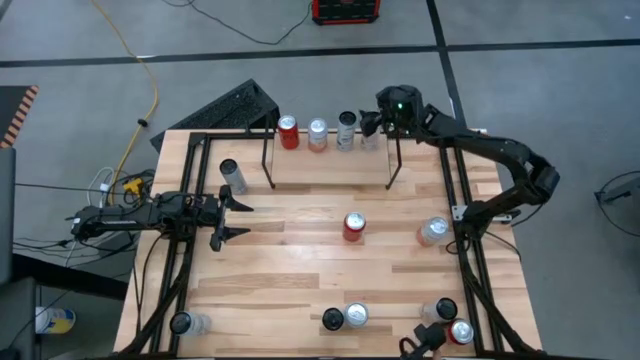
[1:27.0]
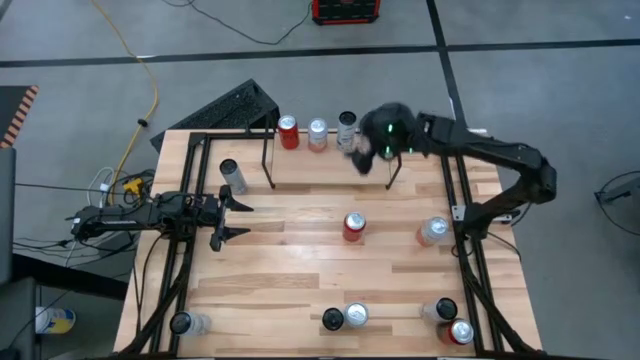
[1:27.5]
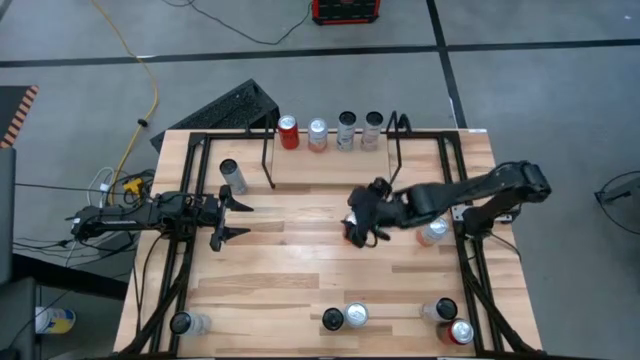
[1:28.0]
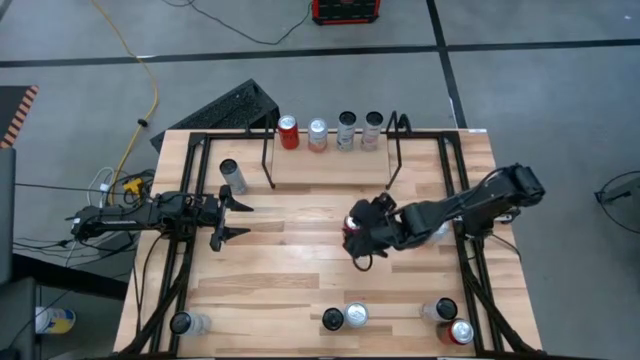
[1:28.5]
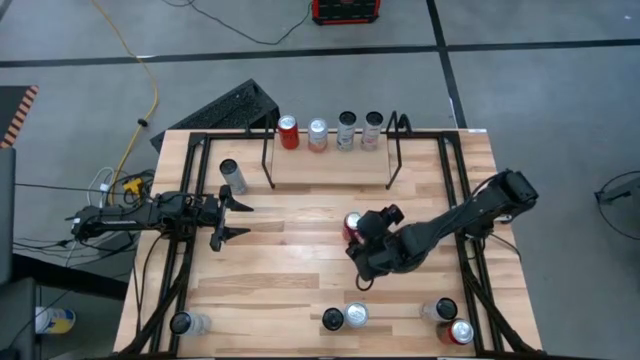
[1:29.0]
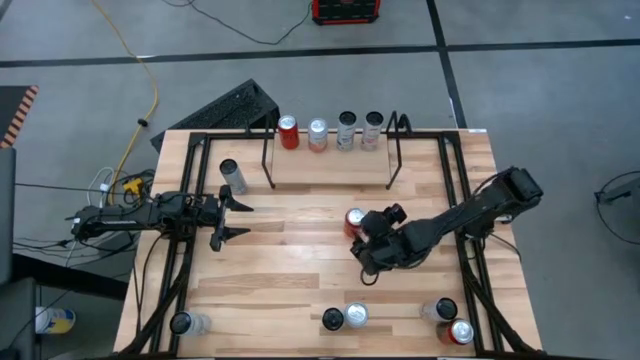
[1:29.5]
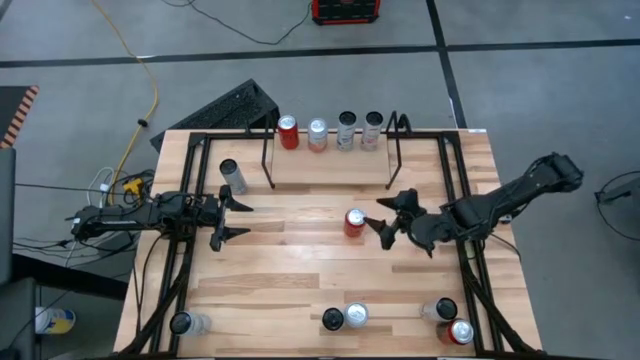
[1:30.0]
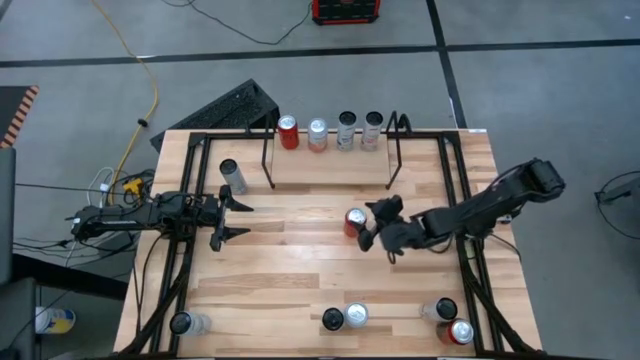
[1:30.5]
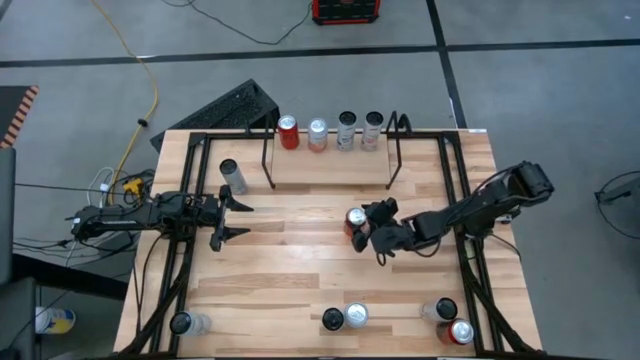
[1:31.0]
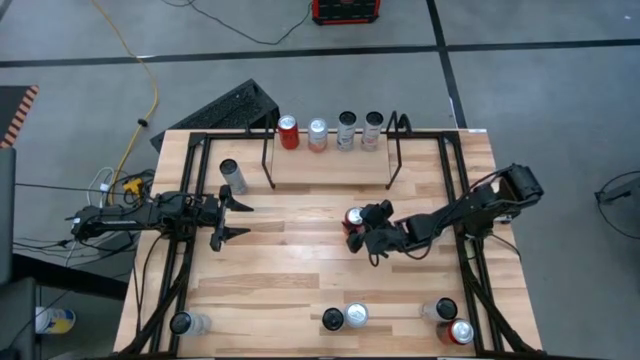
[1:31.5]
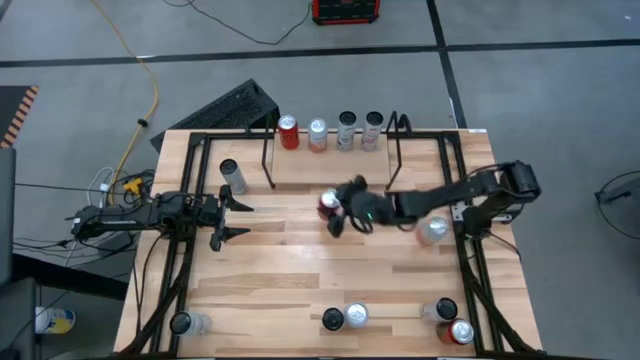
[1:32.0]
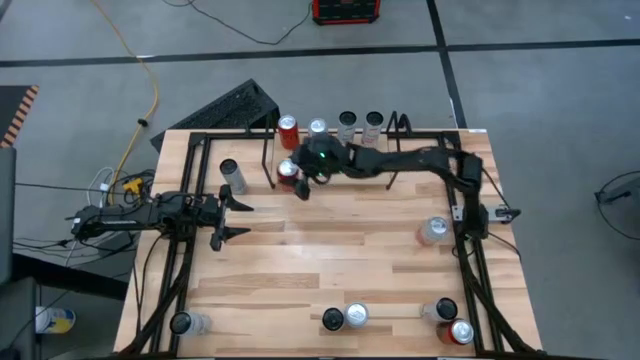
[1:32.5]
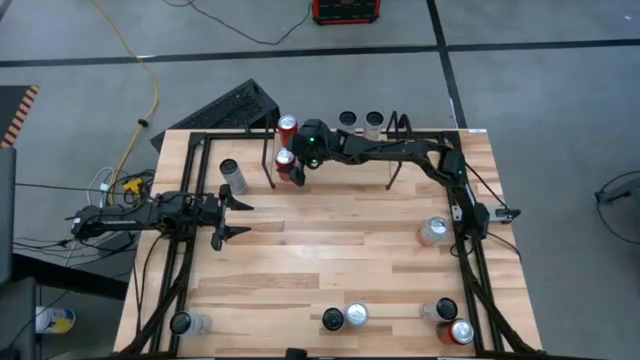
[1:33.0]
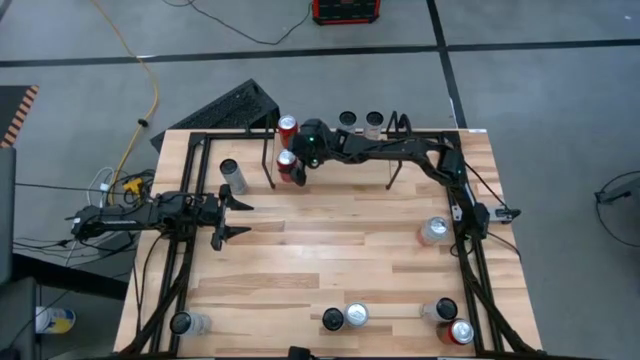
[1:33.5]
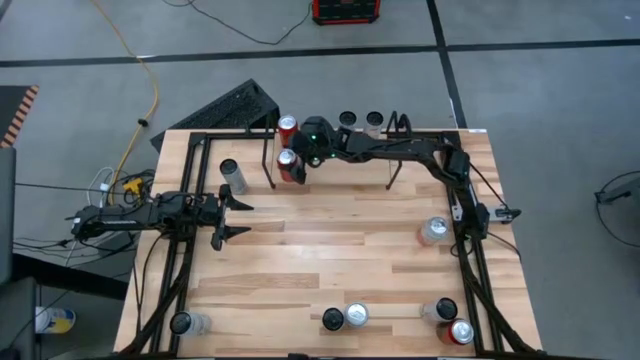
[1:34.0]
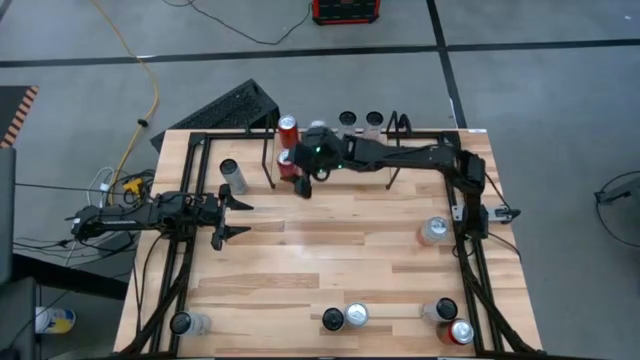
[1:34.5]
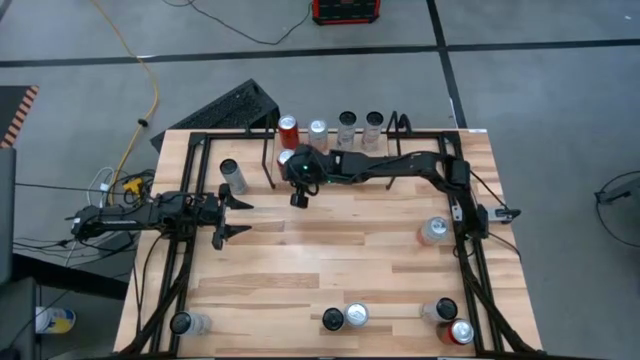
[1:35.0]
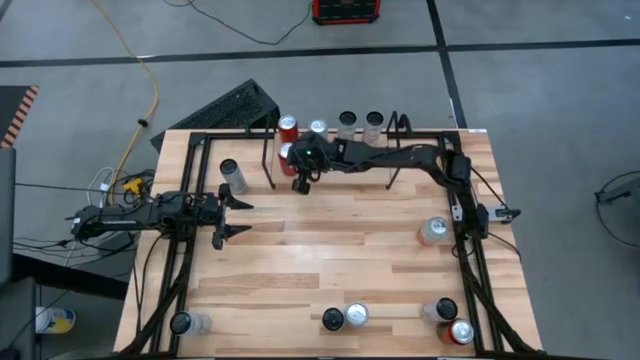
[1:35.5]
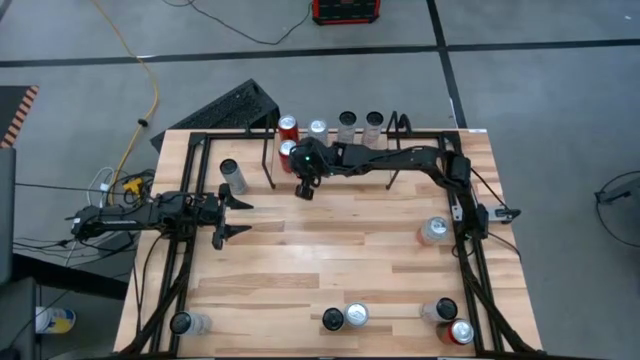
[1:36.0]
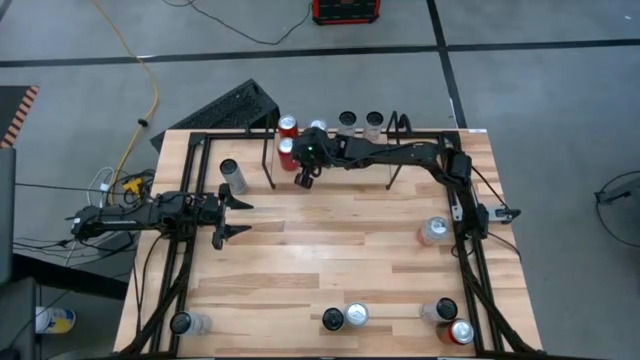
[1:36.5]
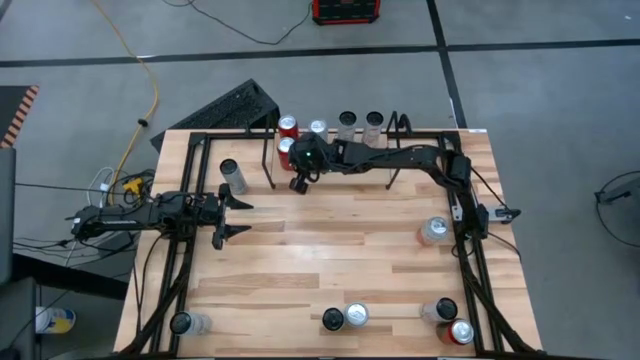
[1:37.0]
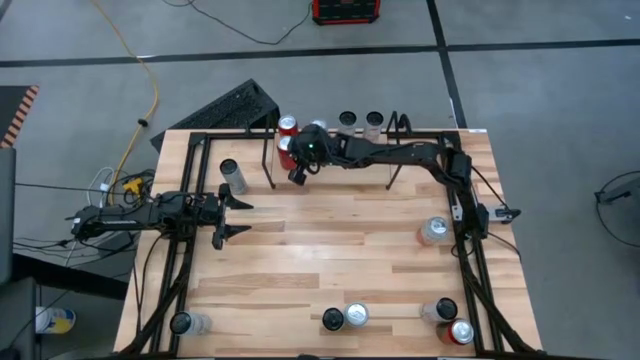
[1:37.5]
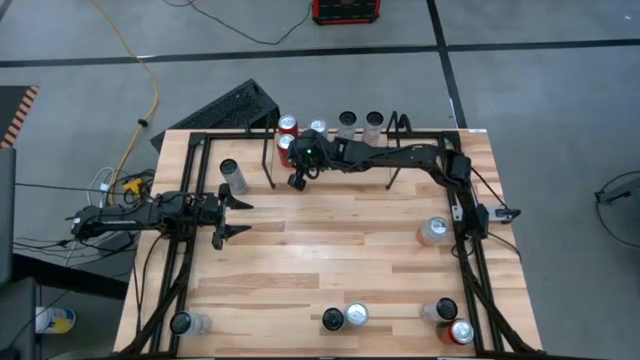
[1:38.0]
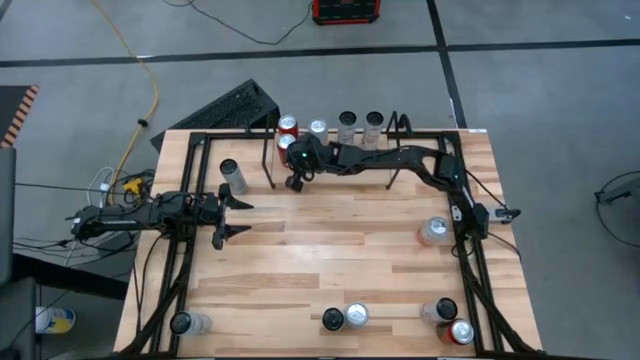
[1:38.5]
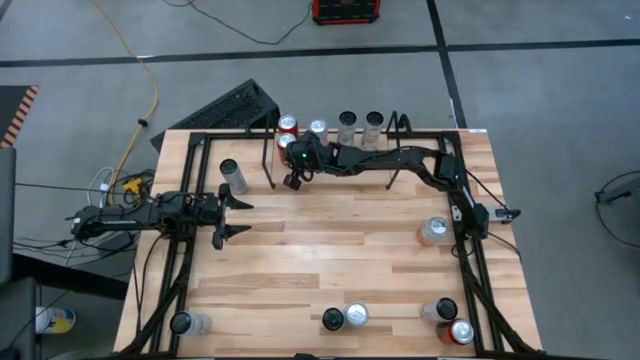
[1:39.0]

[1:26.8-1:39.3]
Task: Place canned beverage on shelf
Put the top red black soda can on the shelf and align with other red black soda can

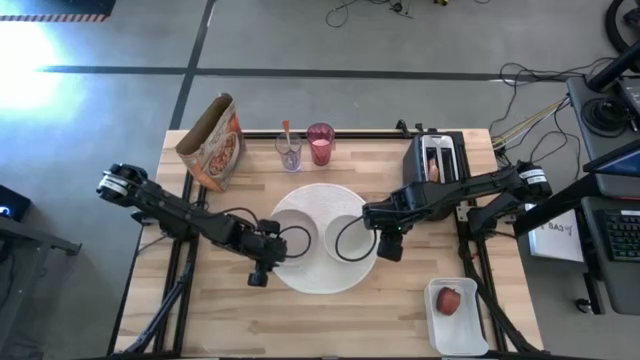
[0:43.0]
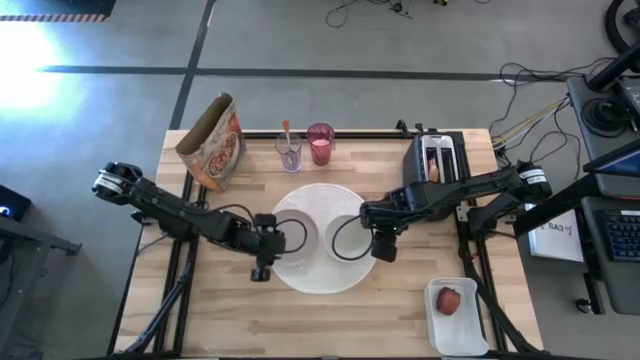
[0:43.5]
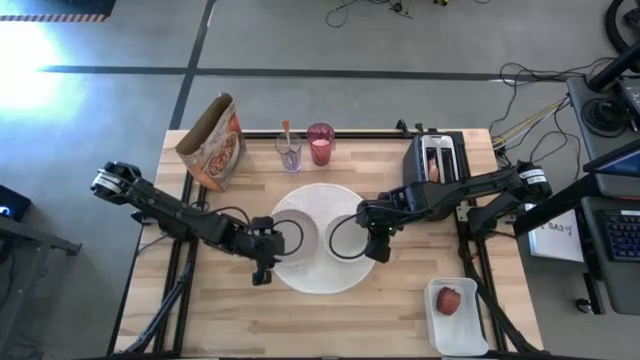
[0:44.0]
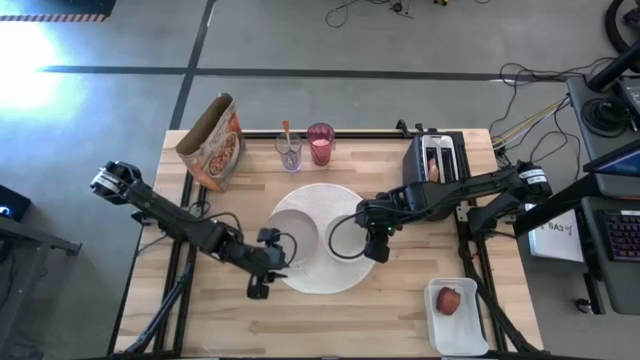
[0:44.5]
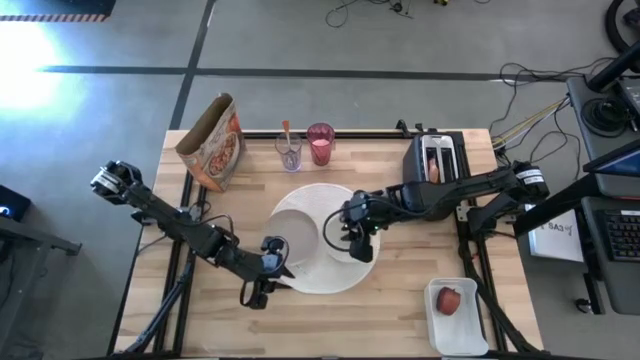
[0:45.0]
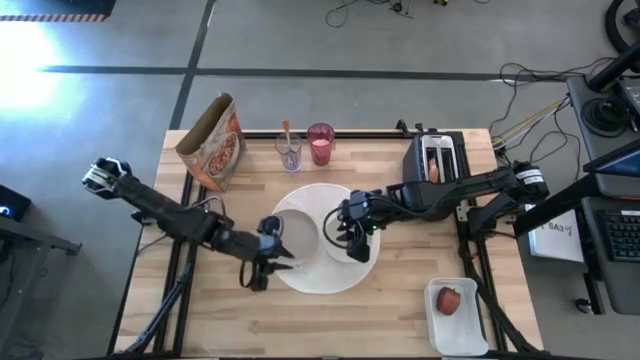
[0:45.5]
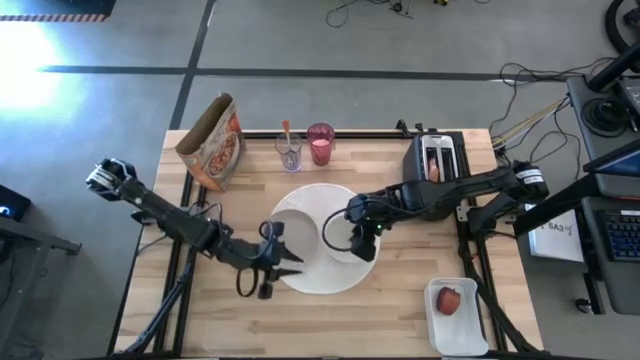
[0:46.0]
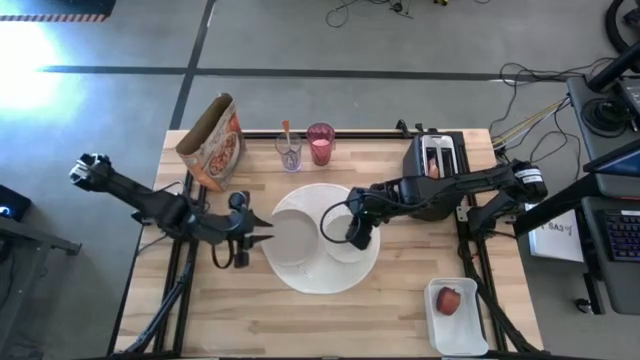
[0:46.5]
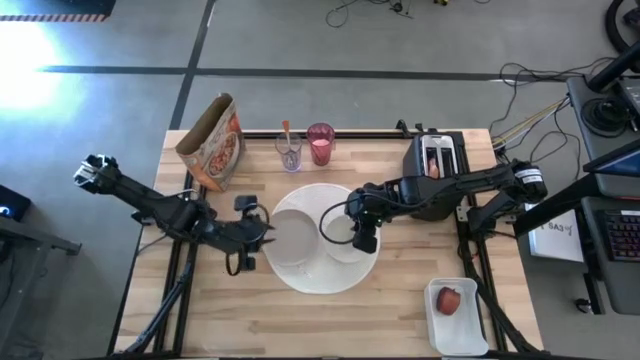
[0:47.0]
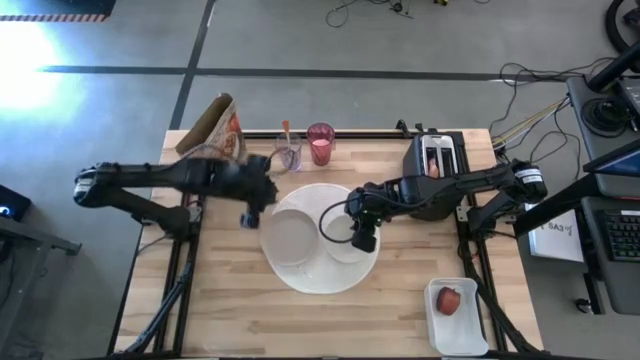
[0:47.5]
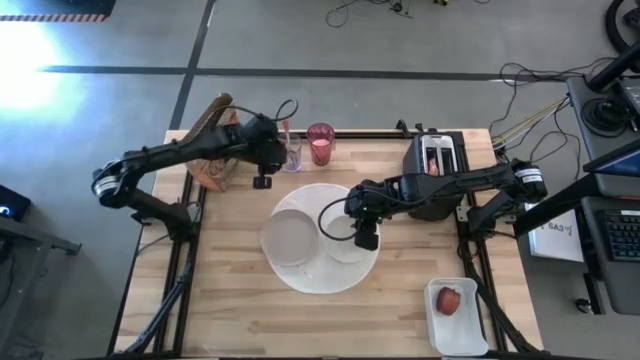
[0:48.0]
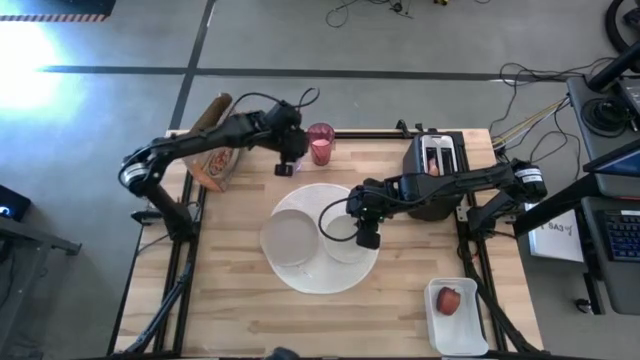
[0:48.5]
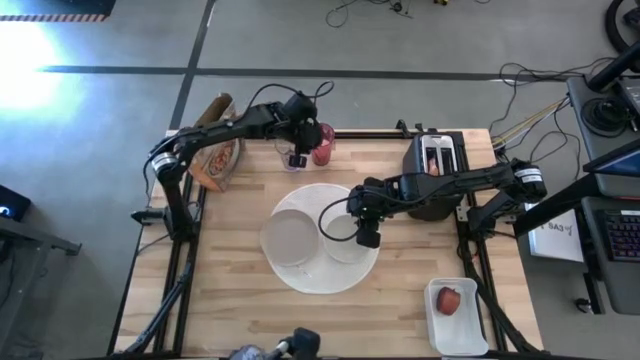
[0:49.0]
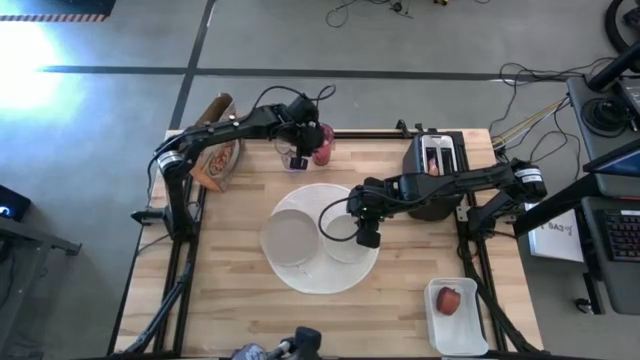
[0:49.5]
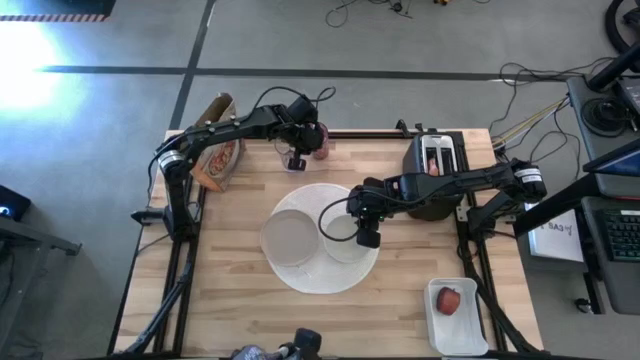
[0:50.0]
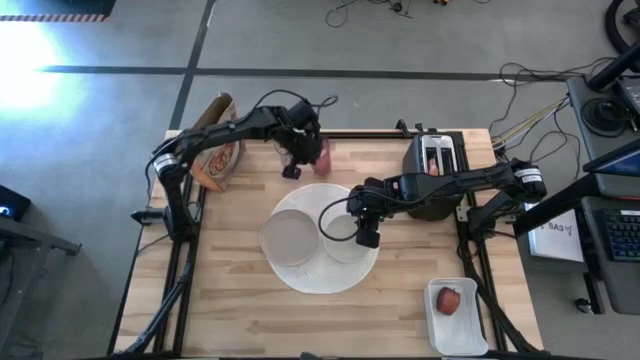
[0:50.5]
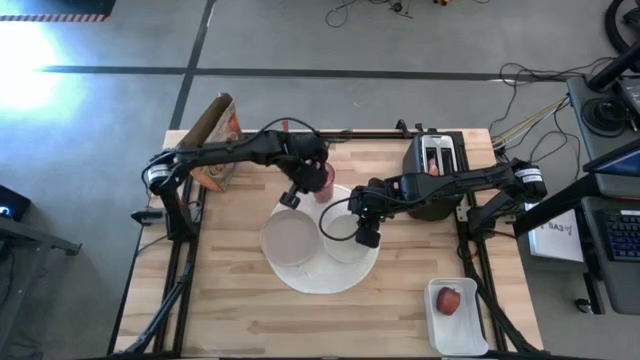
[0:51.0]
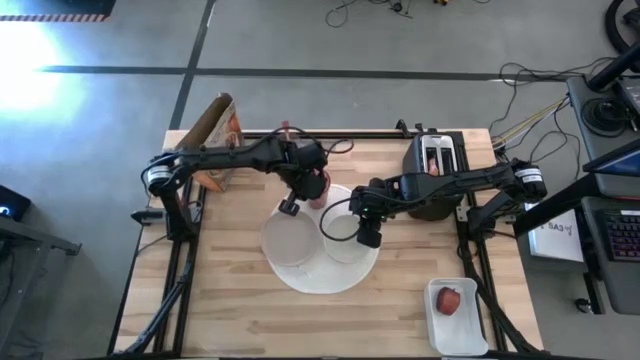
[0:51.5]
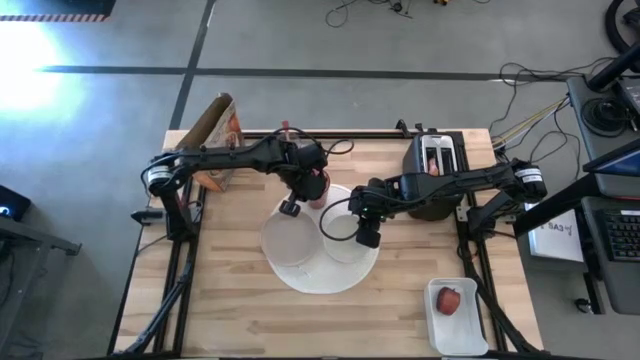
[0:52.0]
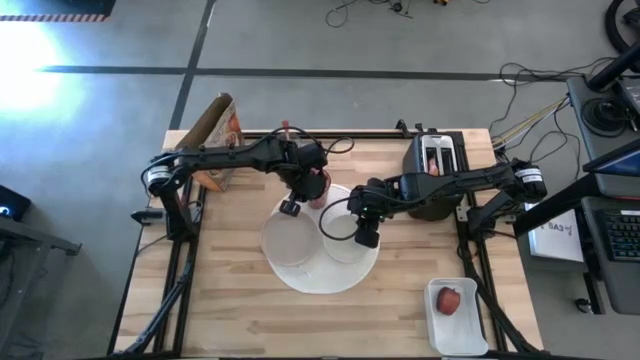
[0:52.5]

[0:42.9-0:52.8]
Task: Arrange a breakfast setting
Put the red cup on the white table mat to the top right of the gray plate
